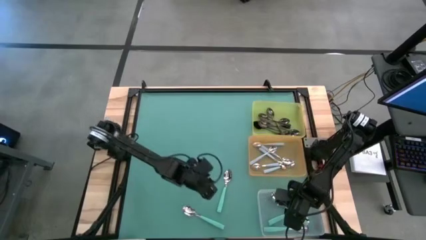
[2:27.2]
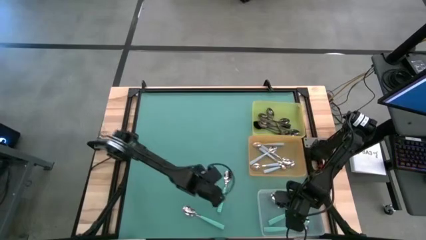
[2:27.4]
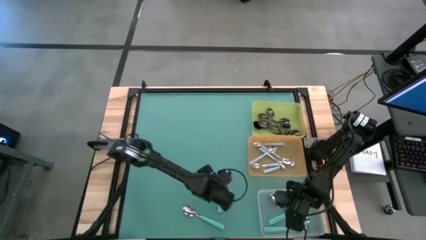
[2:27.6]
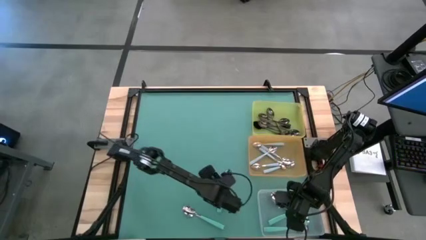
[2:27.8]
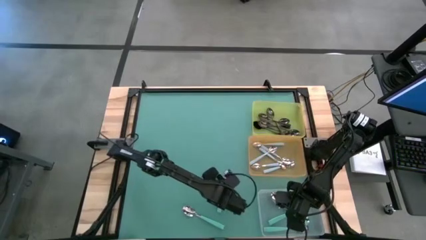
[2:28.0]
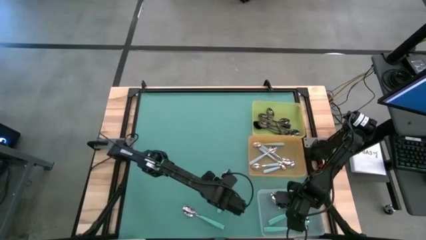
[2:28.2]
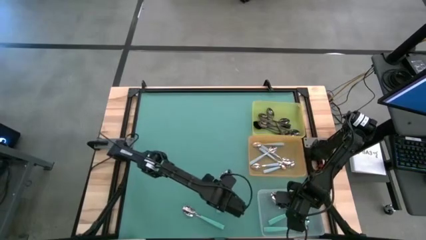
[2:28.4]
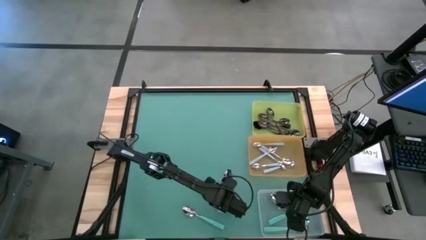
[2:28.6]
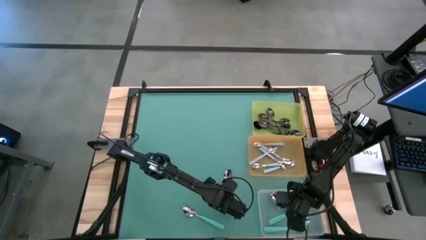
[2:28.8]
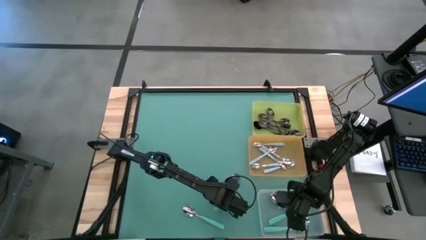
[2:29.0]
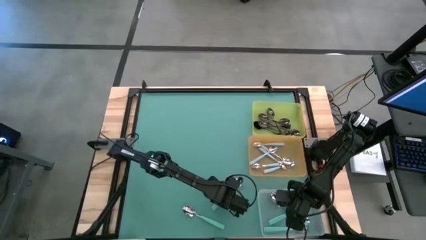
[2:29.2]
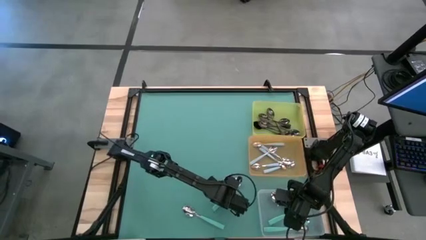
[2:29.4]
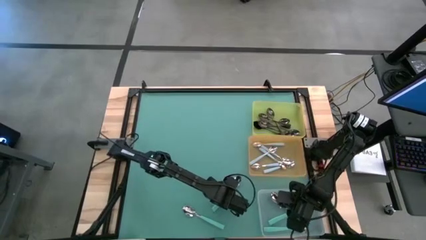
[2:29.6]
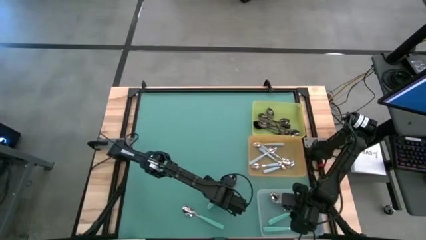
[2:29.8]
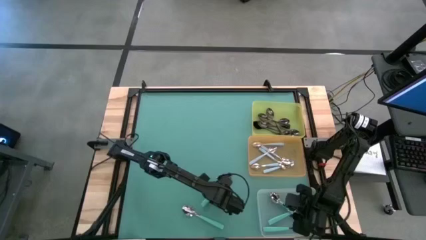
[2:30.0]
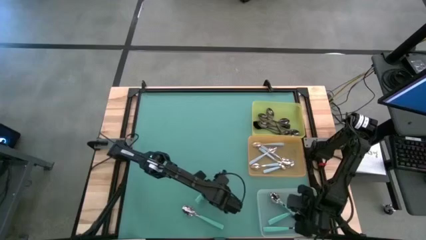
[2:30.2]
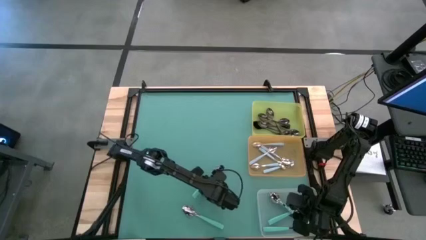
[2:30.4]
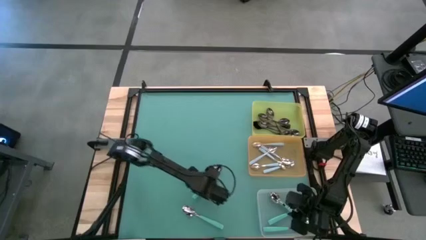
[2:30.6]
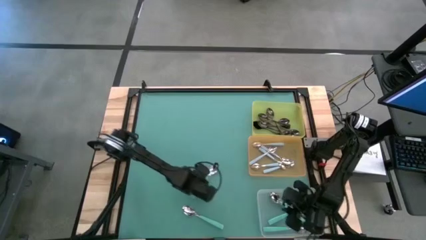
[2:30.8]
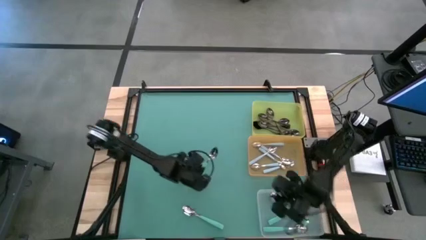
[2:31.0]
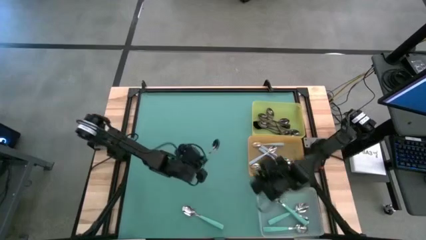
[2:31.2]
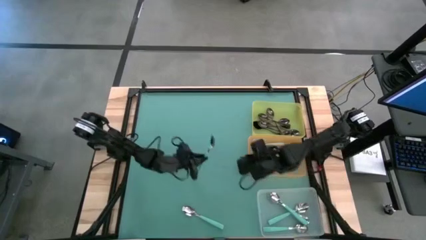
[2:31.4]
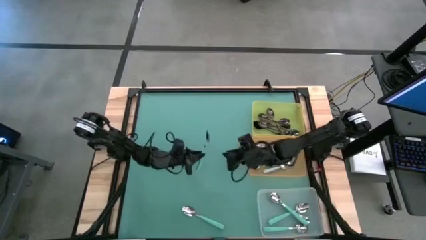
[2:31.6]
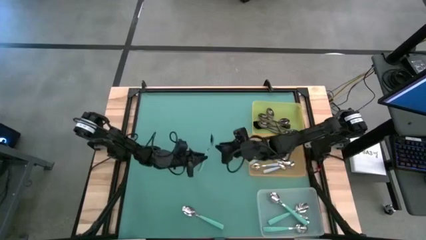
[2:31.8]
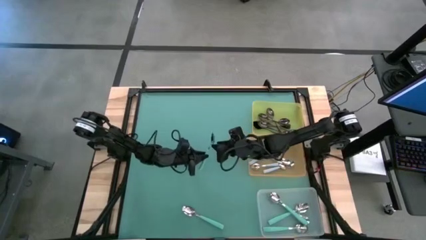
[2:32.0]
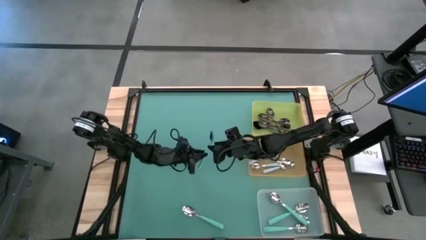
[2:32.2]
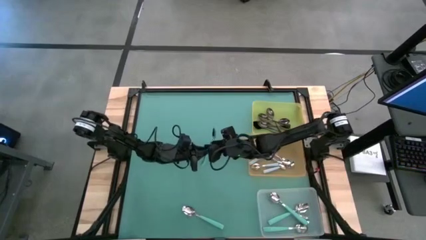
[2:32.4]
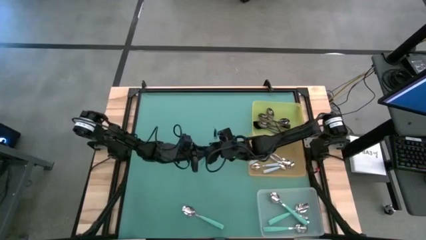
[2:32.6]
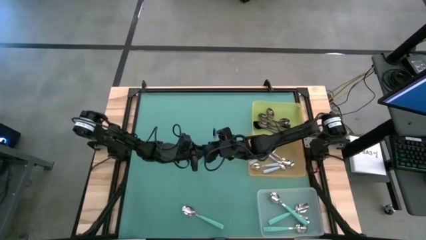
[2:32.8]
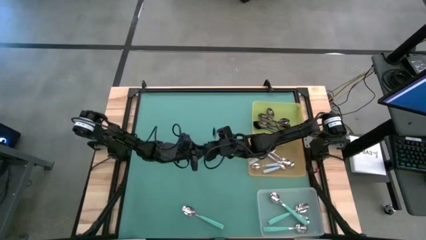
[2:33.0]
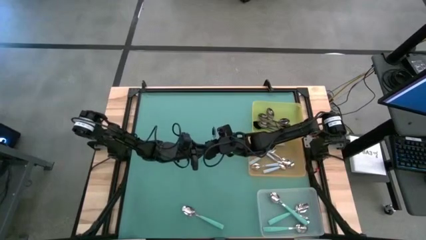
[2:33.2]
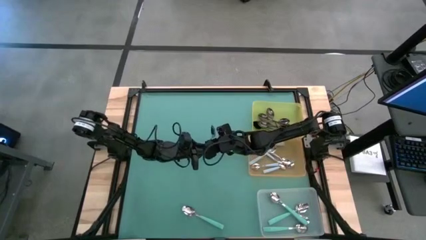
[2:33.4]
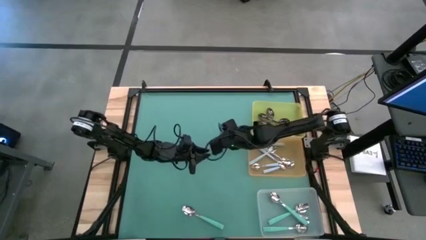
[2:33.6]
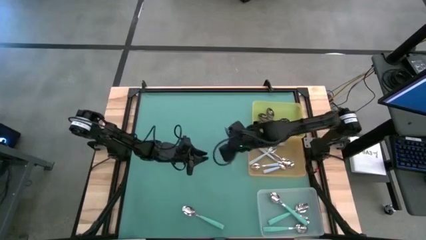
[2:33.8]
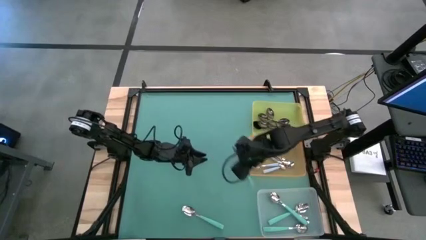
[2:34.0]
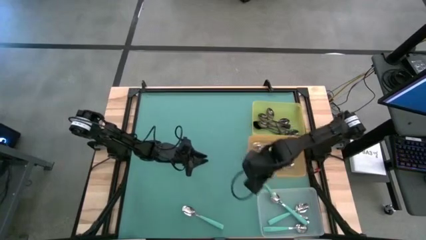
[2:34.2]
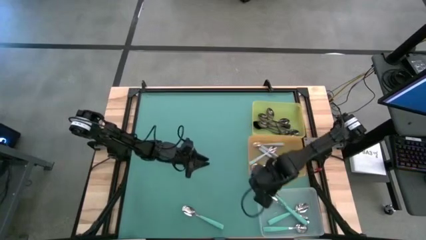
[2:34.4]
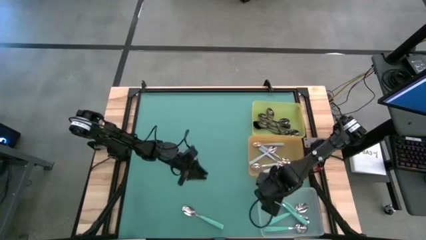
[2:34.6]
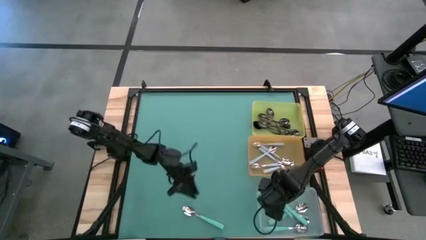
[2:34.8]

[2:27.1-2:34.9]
Task: Sort silverware by color (type)
Put the green spoon into the transparent bin

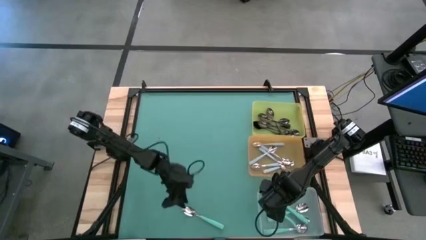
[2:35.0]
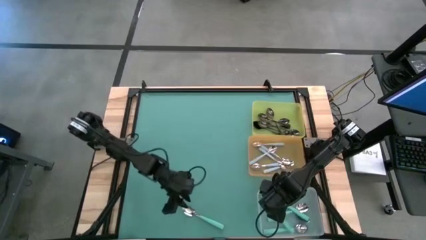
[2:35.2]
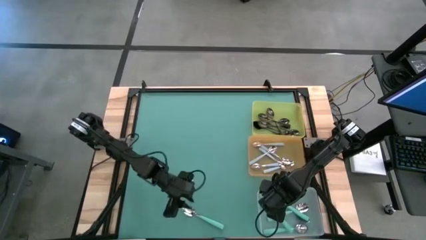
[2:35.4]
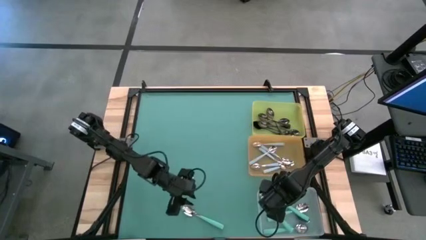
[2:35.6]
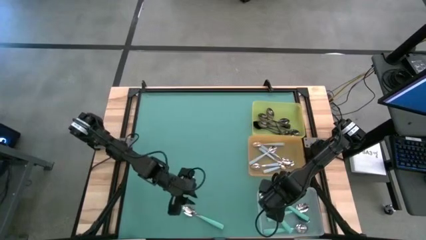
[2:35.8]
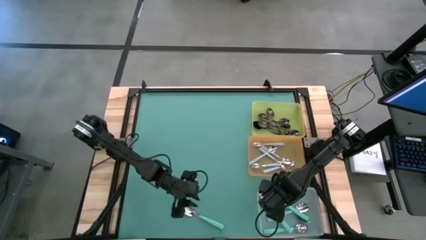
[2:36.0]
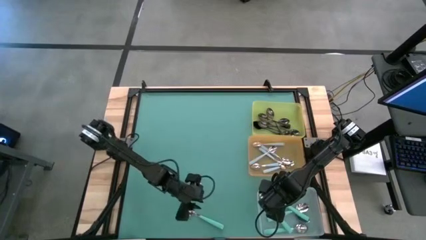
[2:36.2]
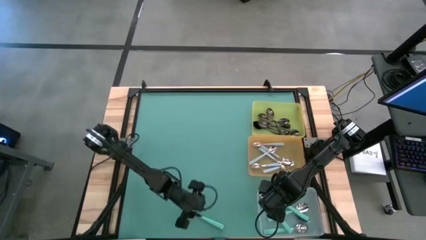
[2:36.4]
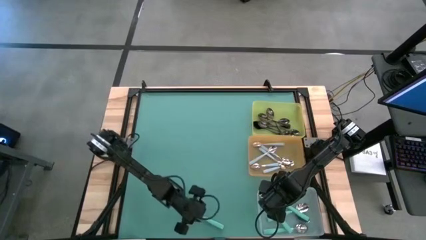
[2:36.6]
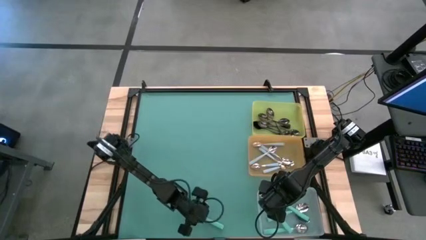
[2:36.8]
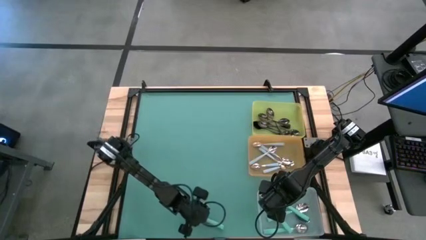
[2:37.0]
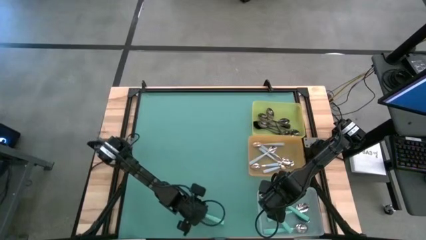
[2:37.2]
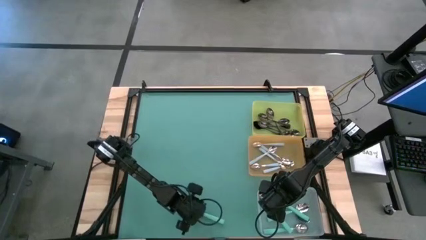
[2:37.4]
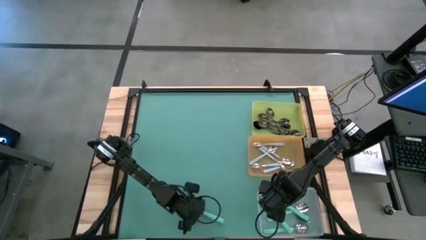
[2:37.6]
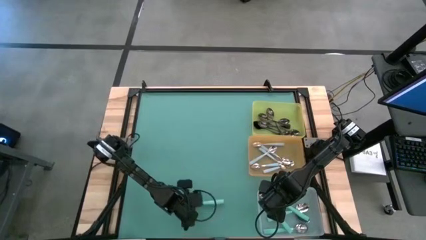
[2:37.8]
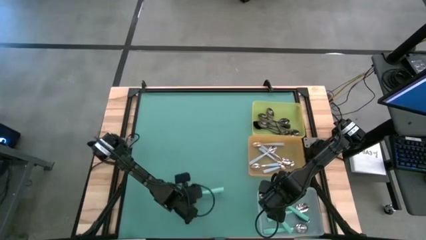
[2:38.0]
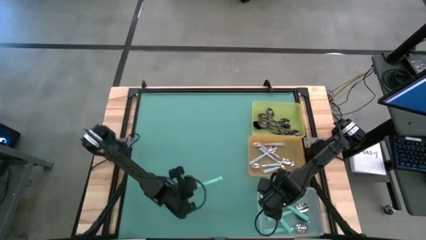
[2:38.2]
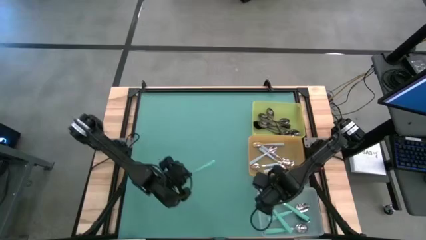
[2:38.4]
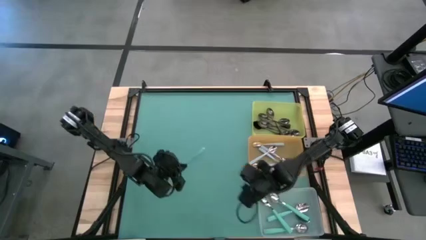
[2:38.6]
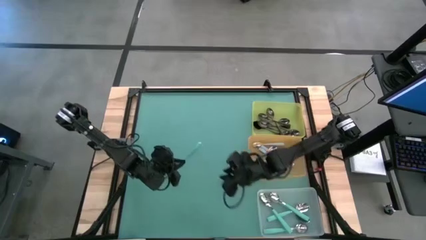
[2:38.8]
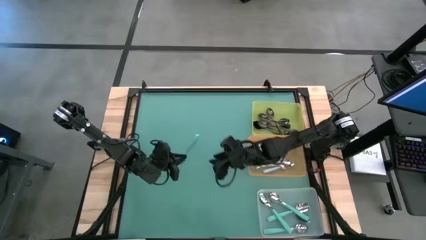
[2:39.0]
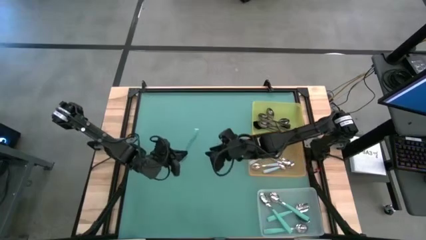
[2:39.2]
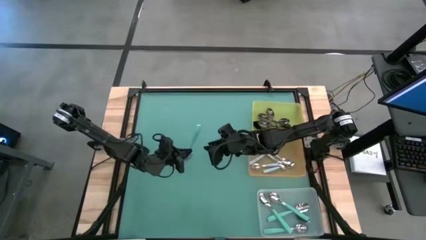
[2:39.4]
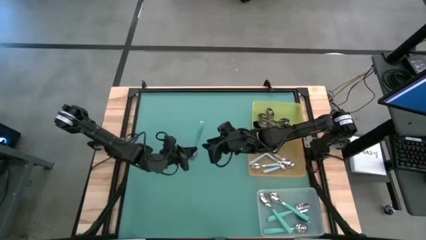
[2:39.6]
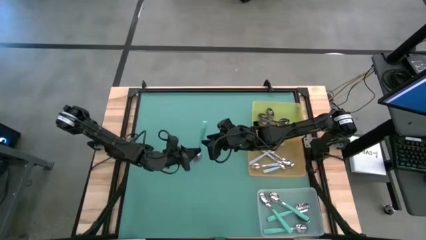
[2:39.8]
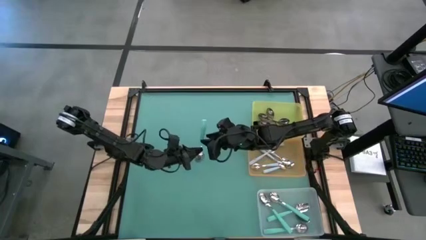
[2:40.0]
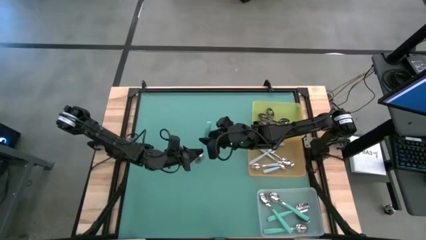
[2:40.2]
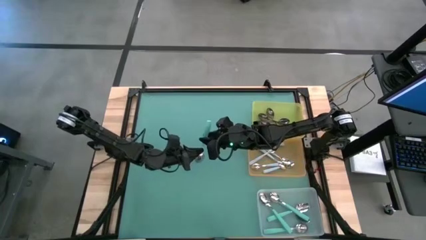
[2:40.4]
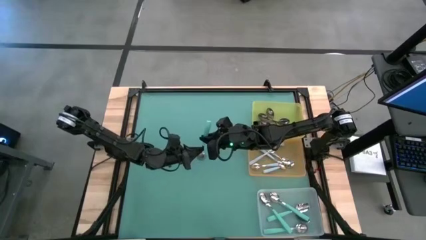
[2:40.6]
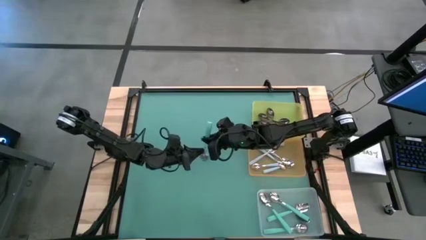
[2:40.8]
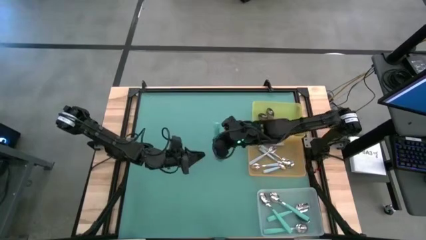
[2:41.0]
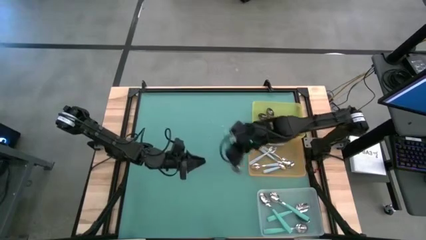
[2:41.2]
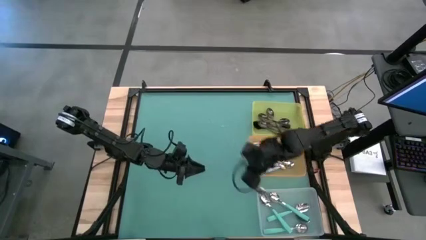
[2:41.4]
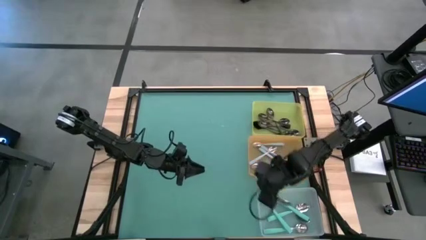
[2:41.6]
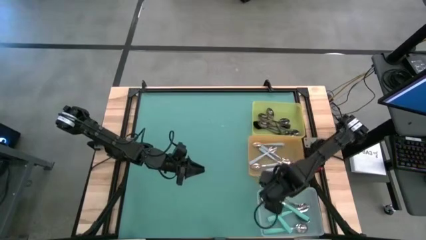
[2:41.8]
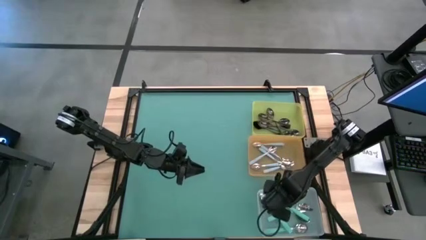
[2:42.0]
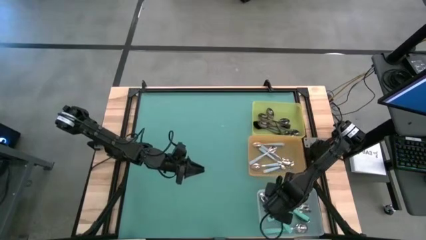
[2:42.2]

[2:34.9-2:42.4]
Put the green spoon into the transparent bin
